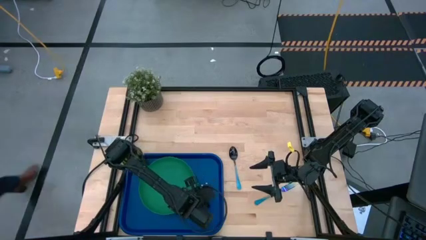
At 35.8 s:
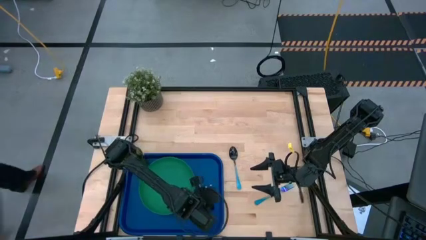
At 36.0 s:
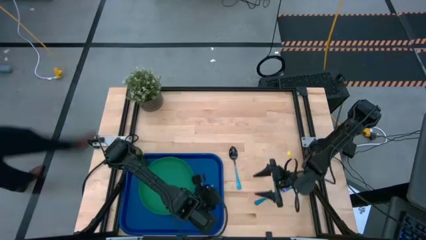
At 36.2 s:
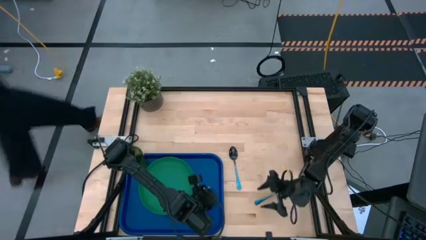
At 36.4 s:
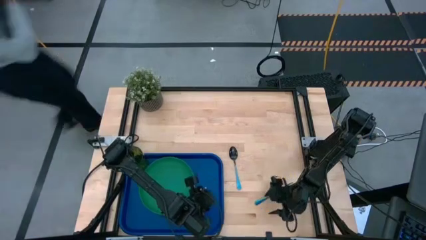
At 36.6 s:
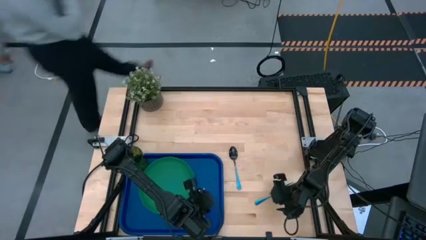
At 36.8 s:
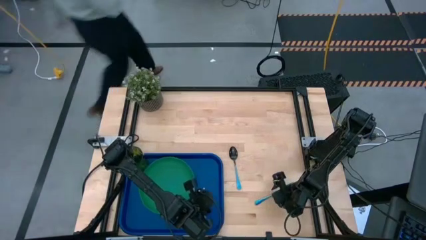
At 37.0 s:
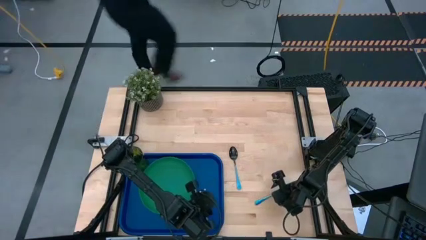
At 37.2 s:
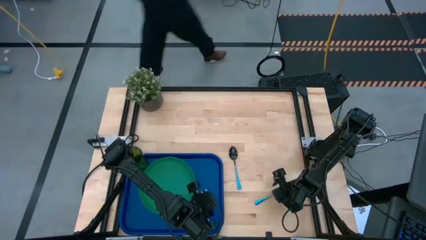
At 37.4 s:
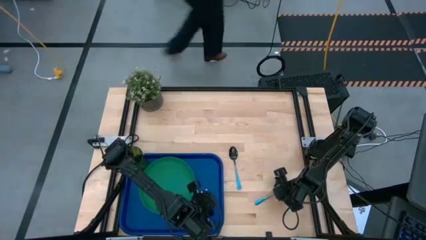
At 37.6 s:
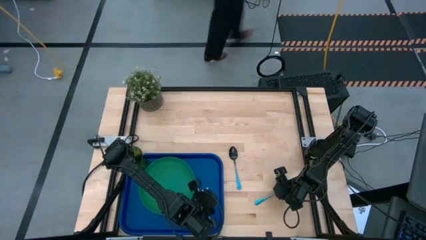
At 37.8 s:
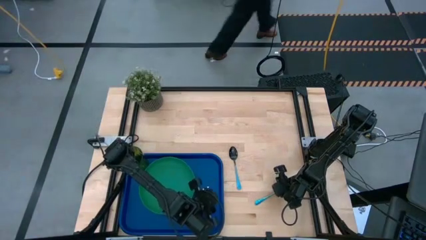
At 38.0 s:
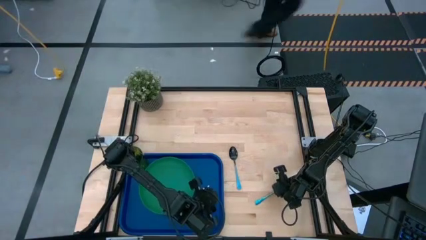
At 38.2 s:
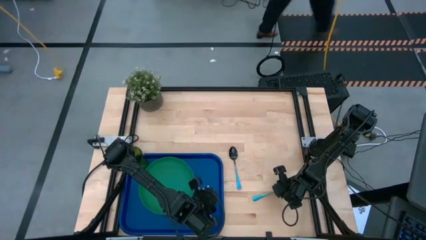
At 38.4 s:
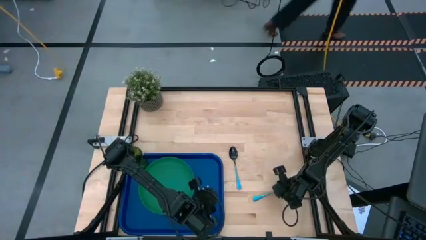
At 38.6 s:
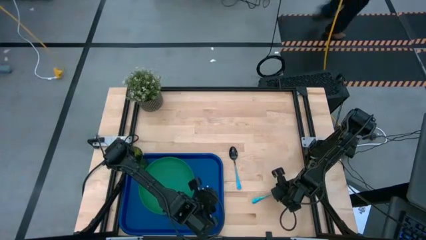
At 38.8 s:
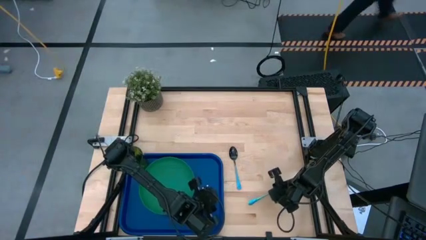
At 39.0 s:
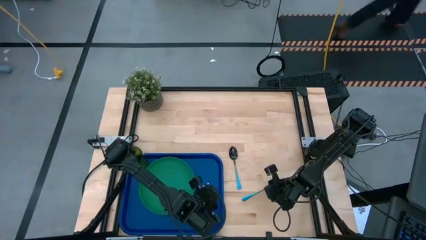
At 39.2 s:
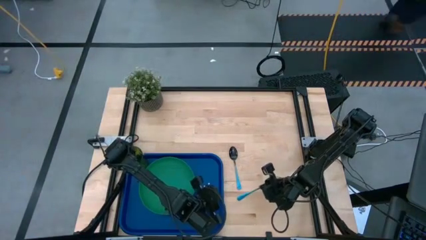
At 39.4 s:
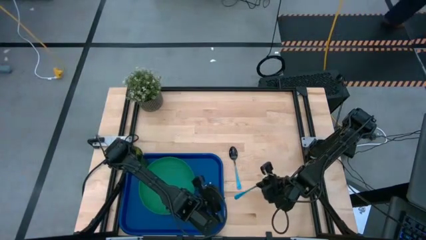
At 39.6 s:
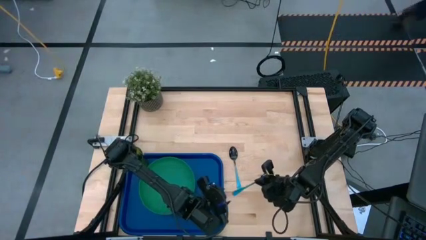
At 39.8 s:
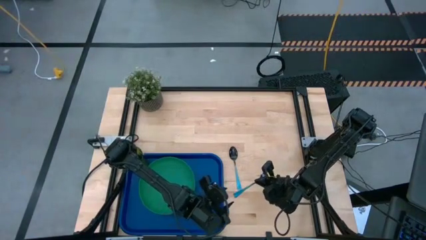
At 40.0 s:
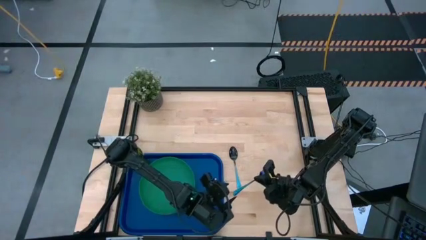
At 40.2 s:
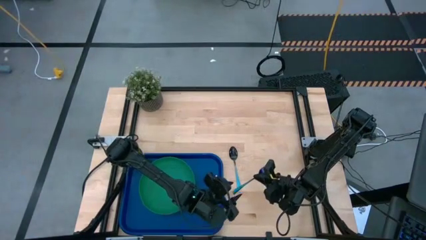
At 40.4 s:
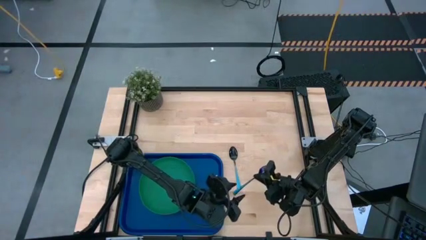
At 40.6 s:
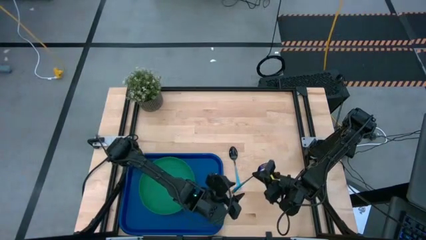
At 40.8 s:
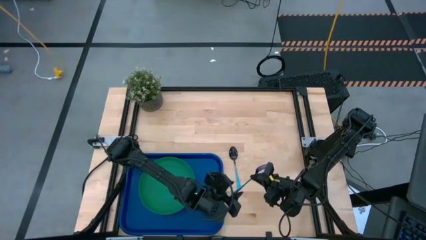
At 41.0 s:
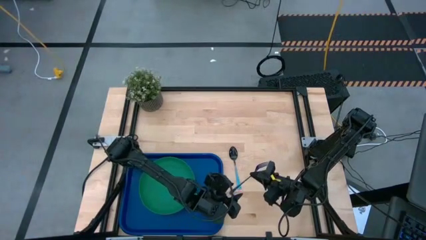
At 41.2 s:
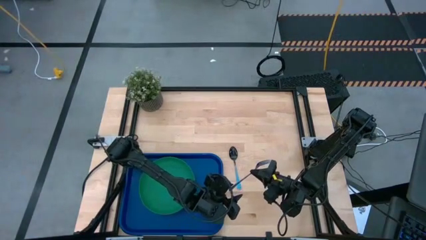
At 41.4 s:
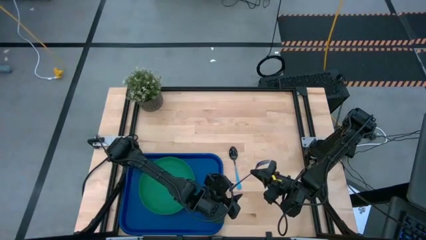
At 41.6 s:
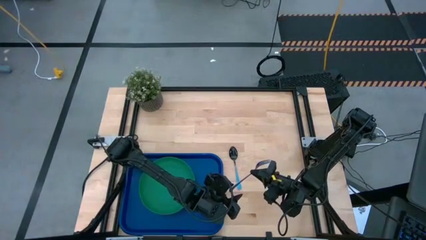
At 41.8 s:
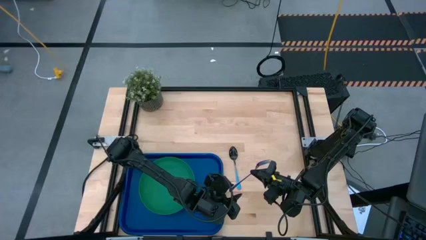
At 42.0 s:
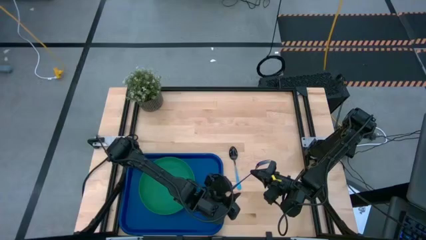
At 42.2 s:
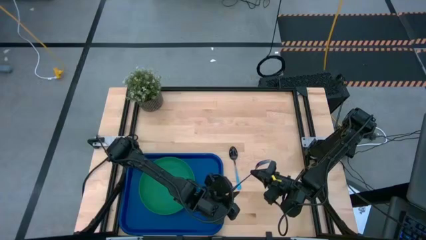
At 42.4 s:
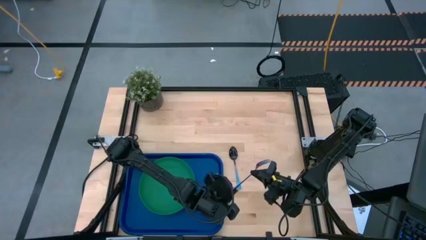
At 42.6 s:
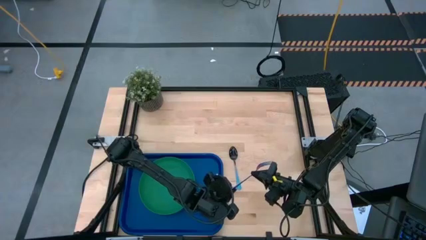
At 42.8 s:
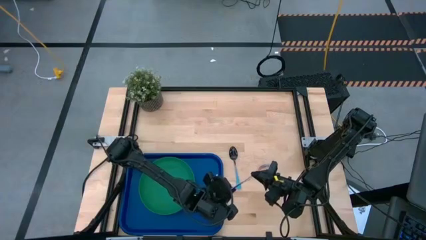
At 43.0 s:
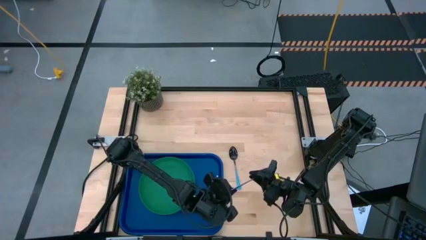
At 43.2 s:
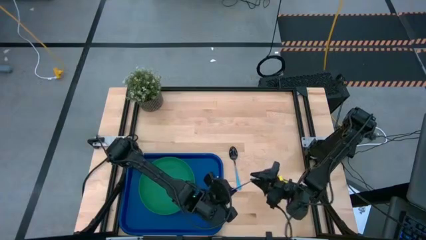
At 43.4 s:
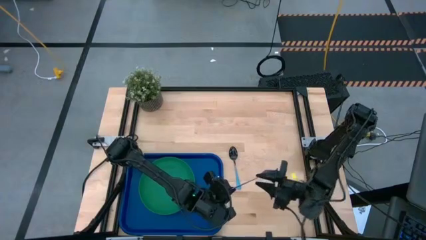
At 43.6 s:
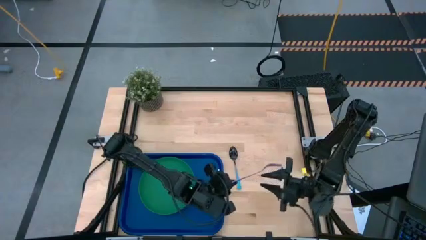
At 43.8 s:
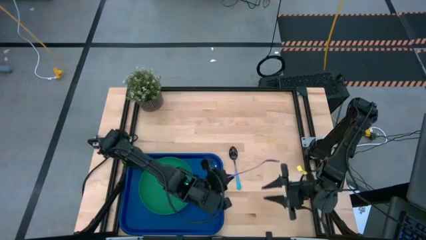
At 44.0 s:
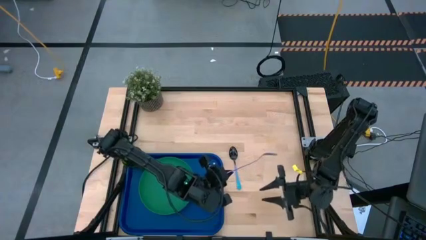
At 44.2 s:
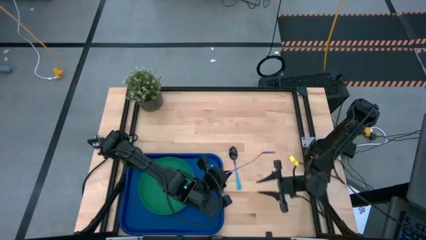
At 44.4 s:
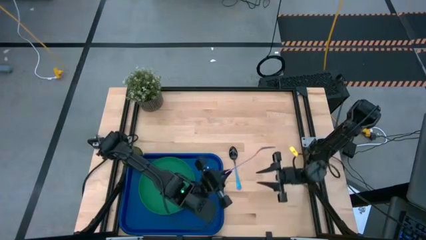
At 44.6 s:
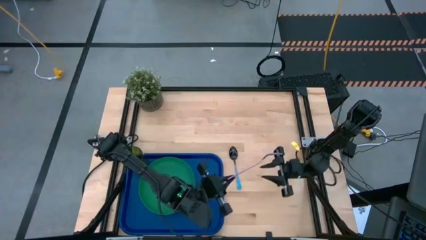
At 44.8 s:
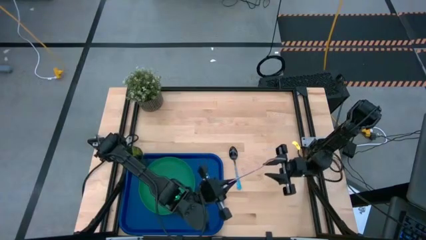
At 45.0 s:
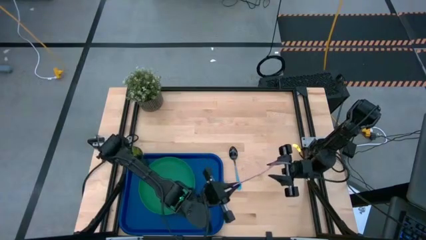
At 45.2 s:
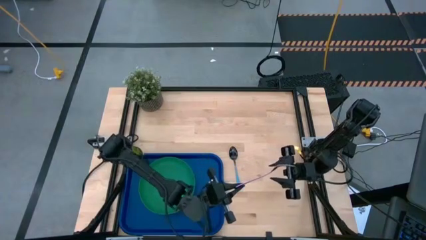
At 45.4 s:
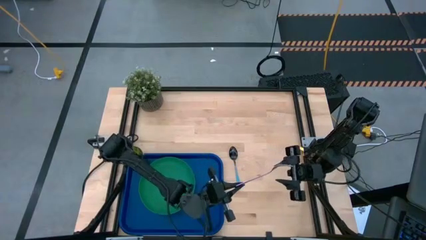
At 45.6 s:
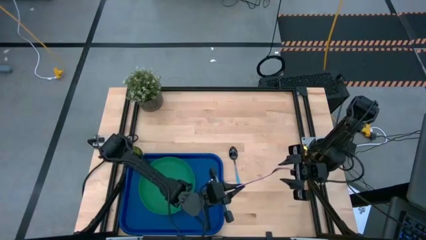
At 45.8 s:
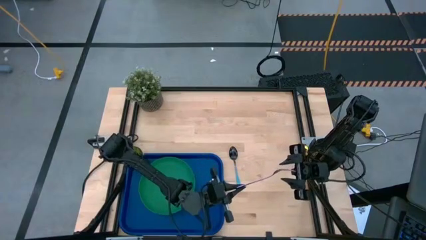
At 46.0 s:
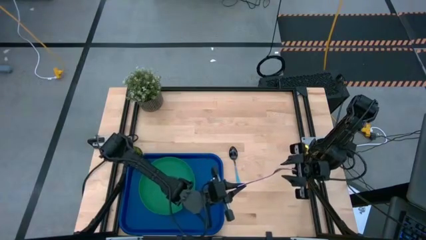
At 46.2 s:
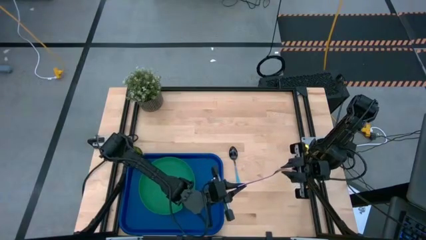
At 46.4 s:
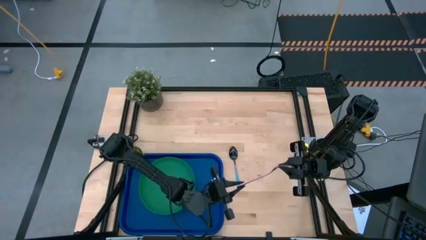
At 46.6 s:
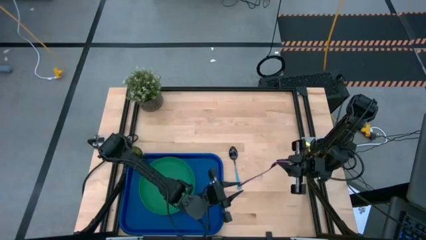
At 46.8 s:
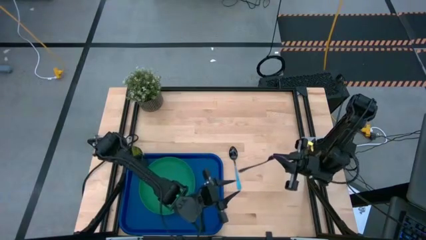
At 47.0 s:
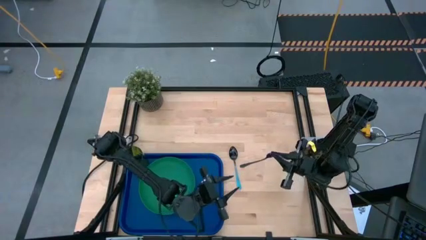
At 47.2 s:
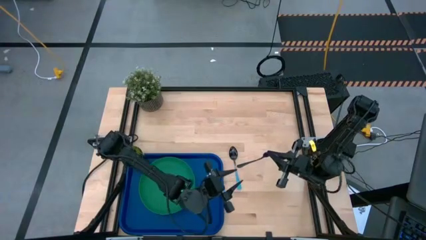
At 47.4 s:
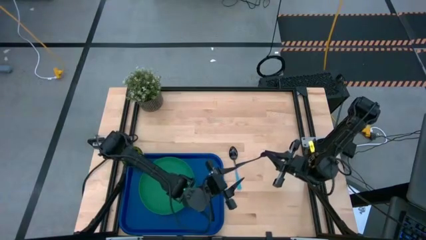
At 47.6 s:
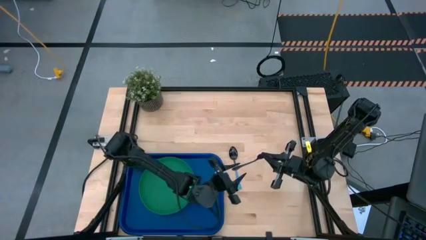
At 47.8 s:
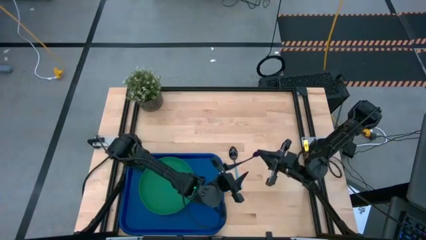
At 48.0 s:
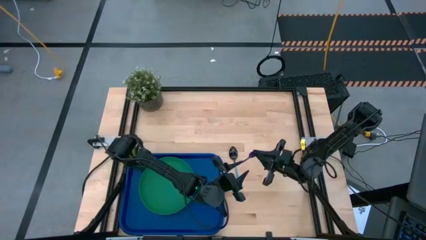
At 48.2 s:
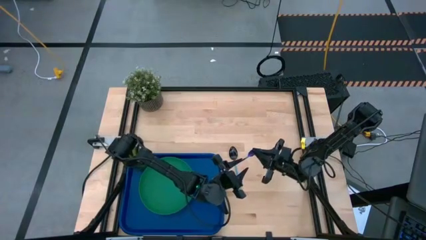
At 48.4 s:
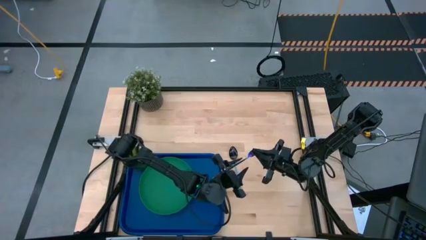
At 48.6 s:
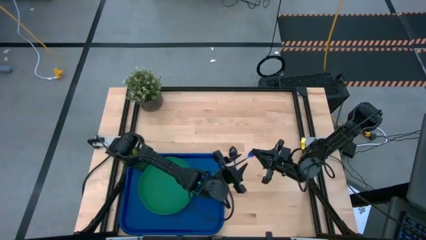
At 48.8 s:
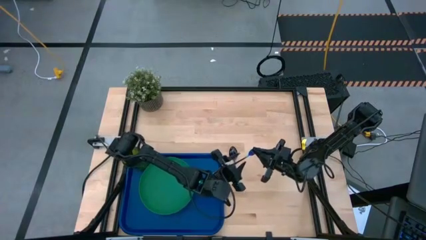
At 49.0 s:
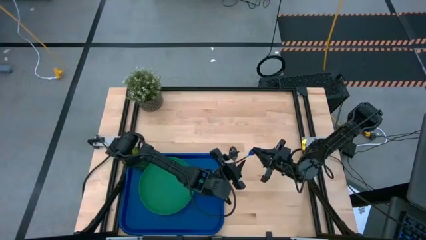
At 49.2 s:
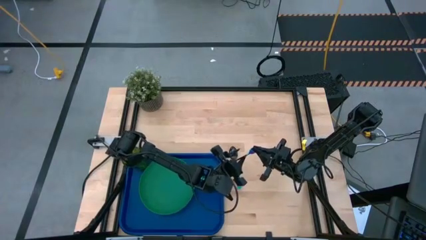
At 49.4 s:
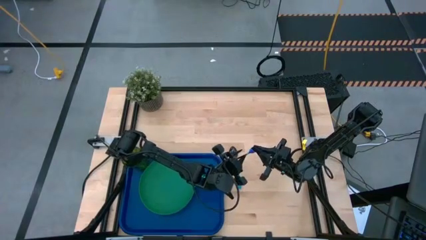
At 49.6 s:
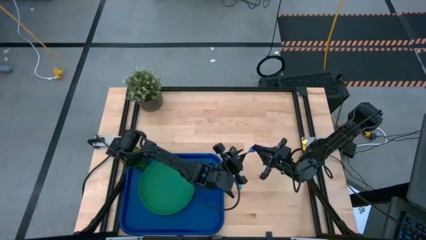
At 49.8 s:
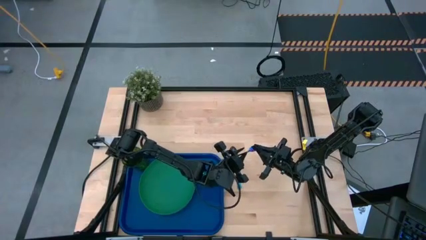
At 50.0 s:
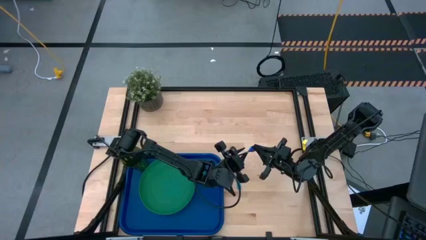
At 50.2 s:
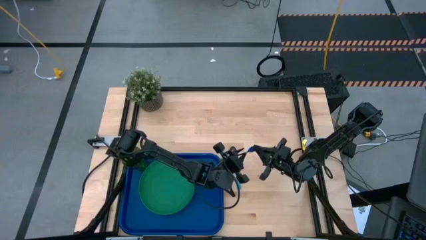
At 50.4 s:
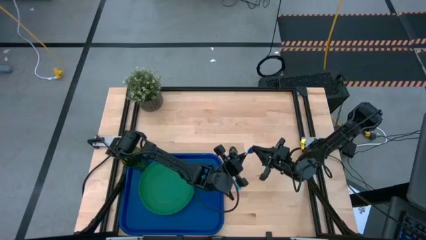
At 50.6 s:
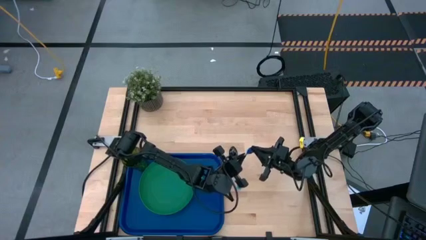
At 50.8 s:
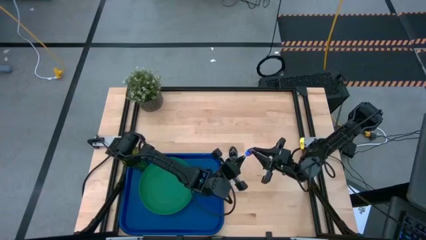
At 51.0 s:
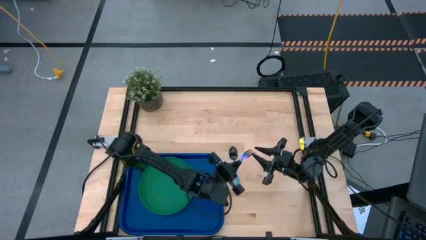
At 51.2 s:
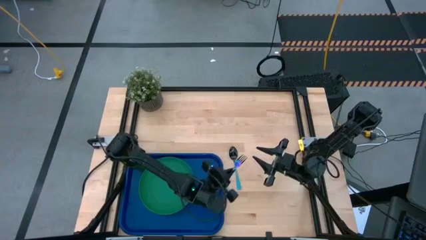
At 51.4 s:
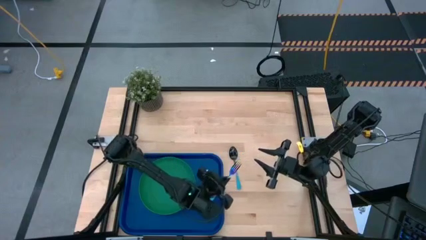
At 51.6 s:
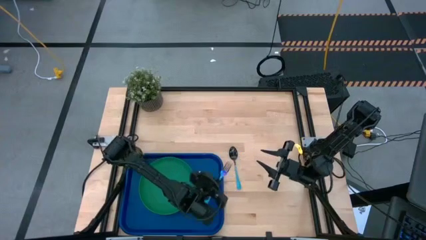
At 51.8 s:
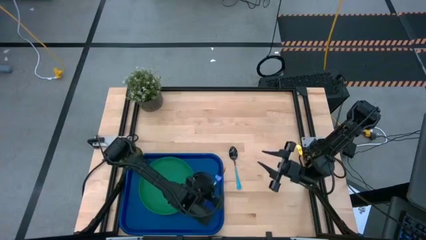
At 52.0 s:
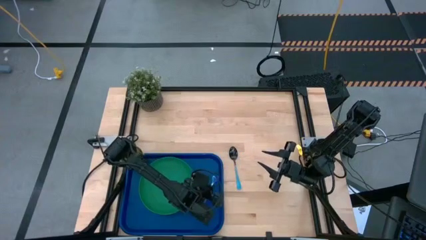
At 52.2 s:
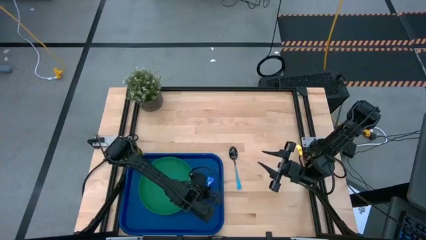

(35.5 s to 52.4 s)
Task: Pick and place plate/cup/fork/spoon on tray
Put the blue fork to the right of the green plate on the dark blue tray
